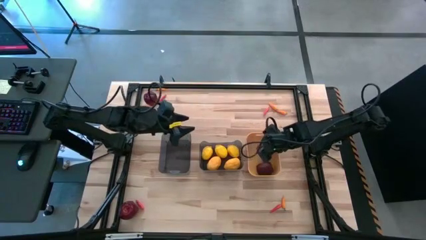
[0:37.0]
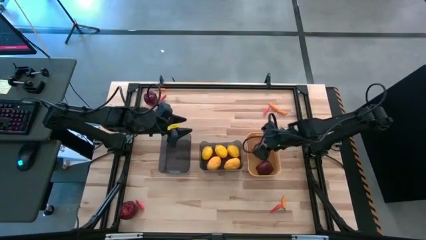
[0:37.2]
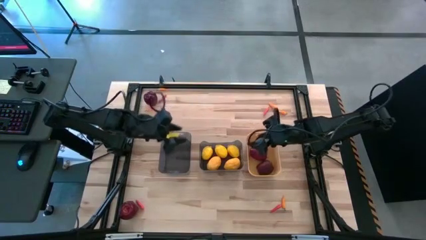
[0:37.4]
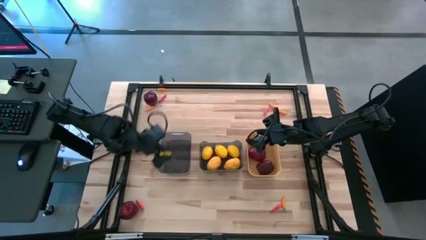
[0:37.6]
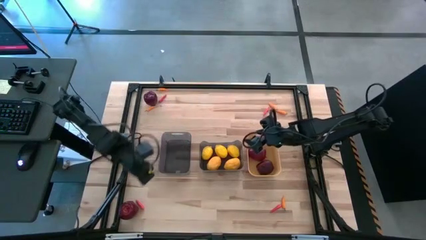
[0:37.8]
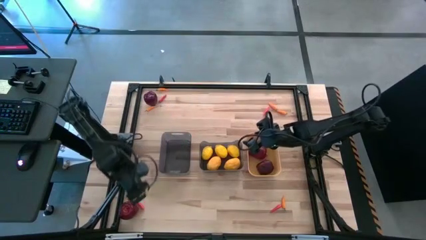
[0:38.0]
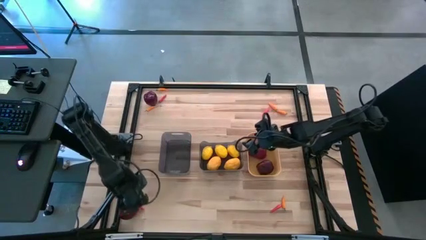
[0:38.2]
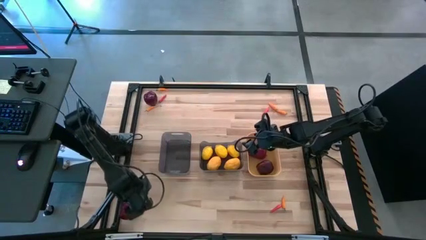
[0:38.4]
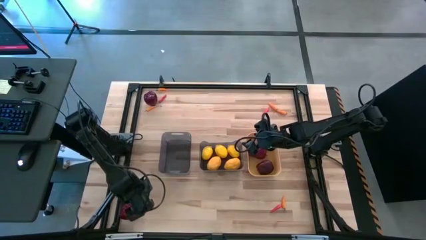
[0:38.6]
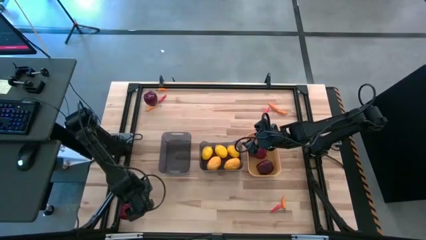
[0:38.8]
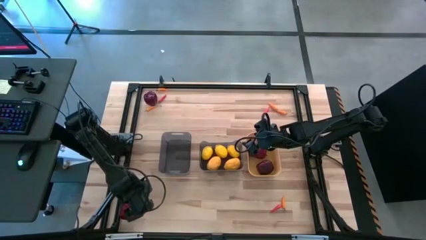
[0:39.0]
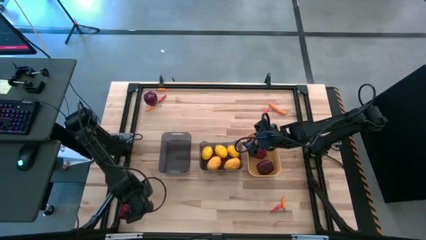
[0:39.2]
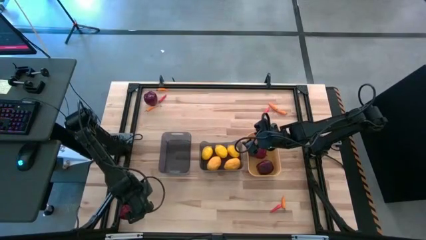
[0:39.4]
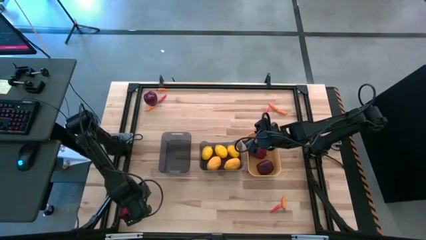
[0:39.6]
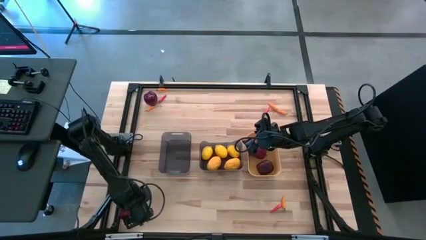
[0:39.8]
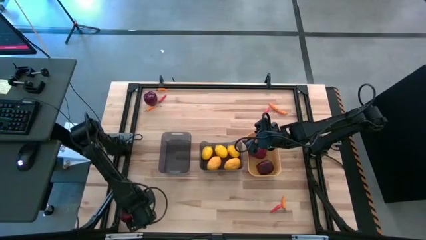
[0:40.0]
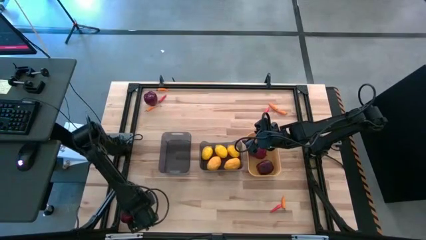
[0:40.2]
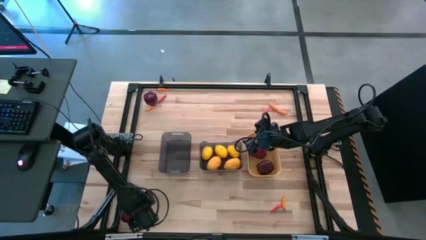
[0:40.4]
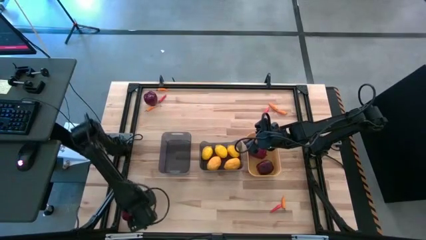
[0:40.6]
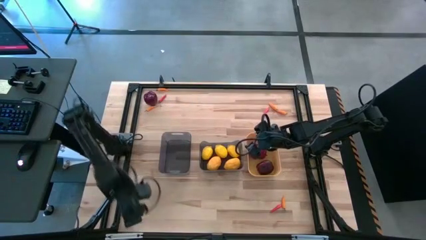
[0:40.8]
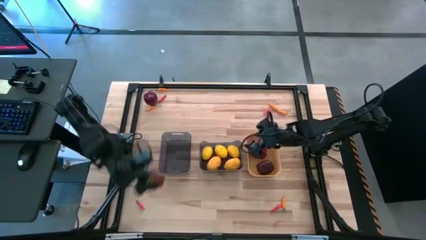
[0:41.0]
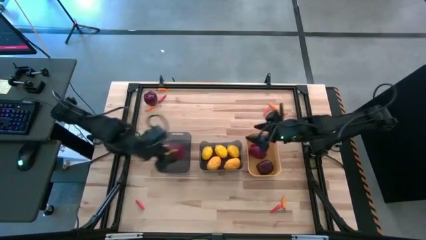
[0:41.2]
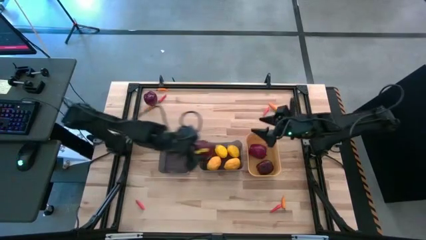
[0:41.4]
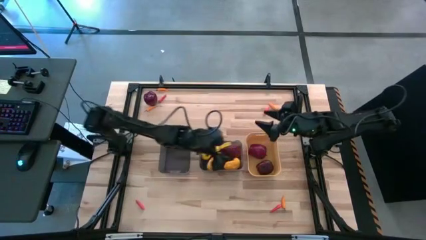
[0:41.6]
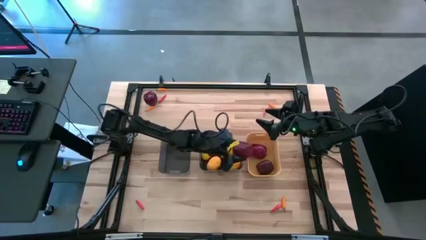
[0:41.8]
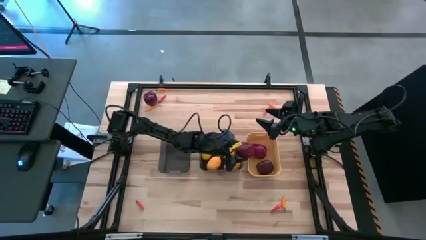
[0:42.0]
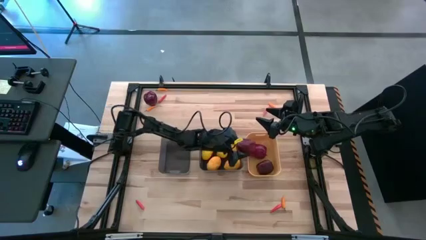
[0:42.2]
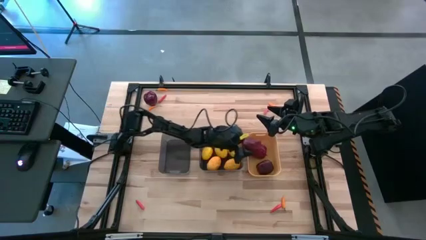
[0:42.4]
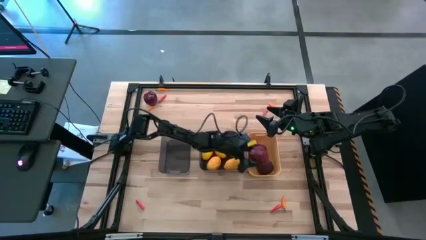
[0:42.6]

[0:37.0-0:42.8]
Task: Sort produce into baskets
Put the apple into the yellow bin

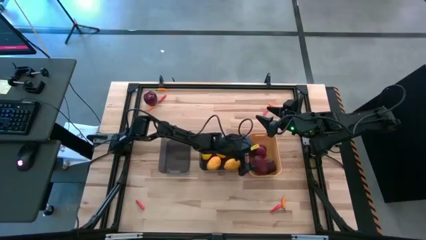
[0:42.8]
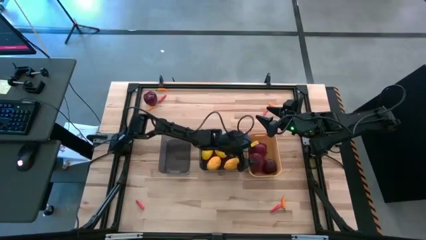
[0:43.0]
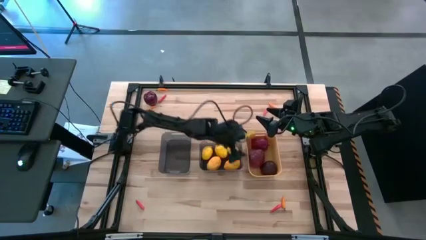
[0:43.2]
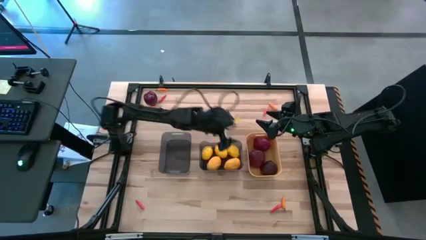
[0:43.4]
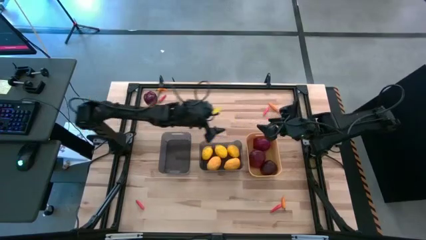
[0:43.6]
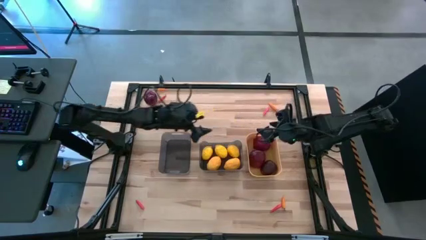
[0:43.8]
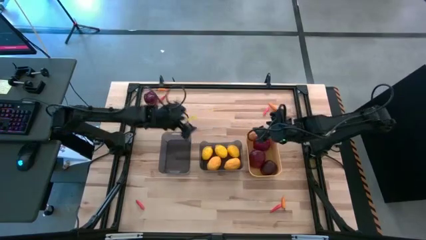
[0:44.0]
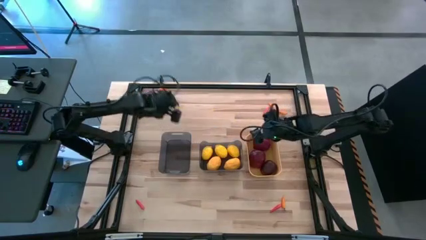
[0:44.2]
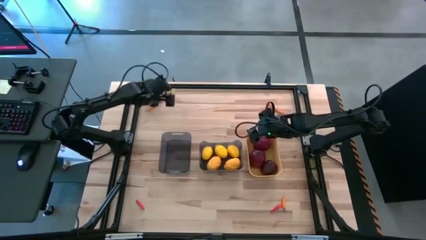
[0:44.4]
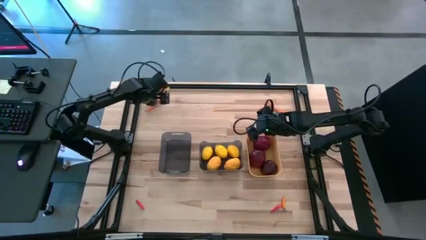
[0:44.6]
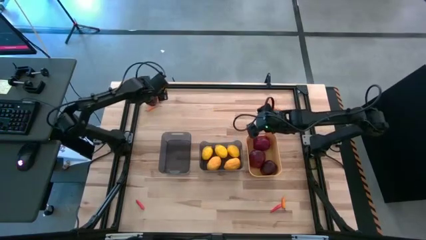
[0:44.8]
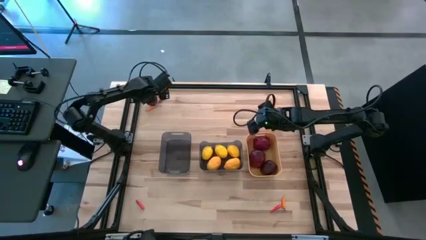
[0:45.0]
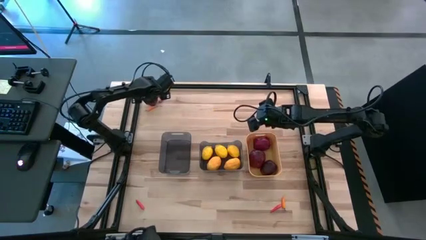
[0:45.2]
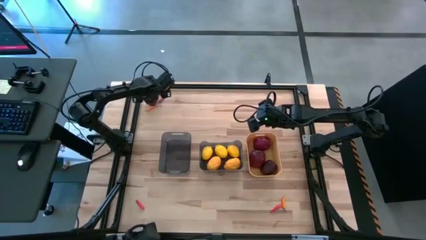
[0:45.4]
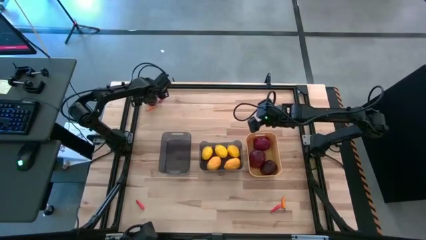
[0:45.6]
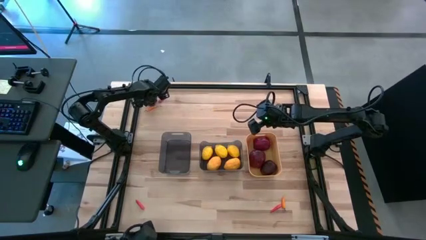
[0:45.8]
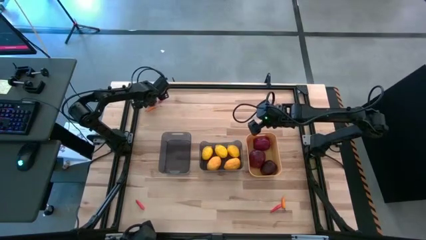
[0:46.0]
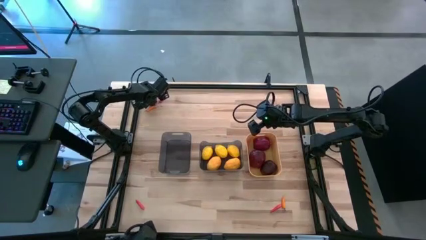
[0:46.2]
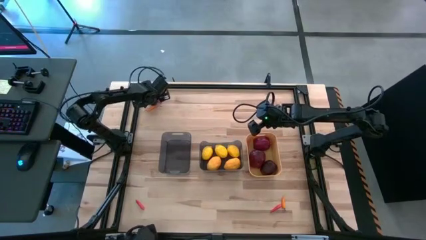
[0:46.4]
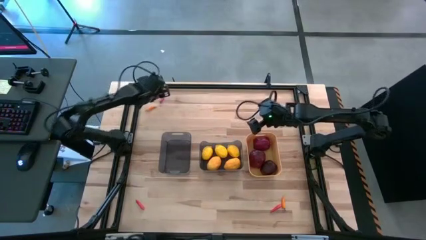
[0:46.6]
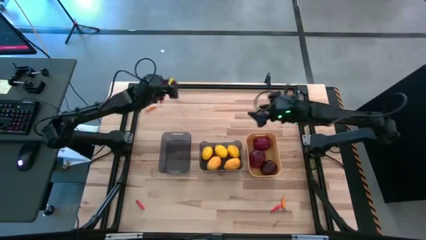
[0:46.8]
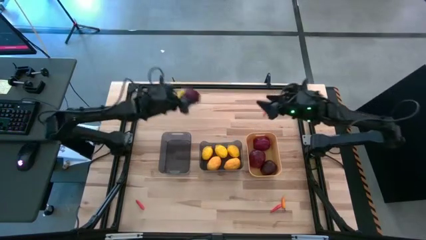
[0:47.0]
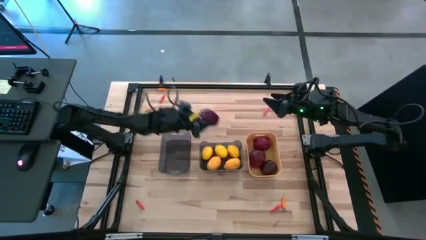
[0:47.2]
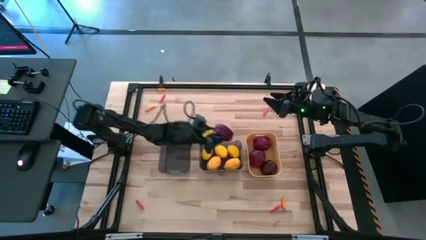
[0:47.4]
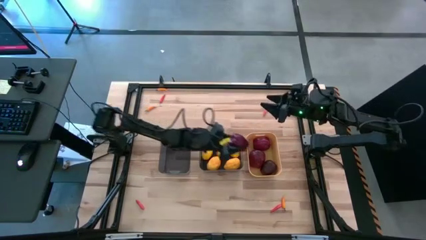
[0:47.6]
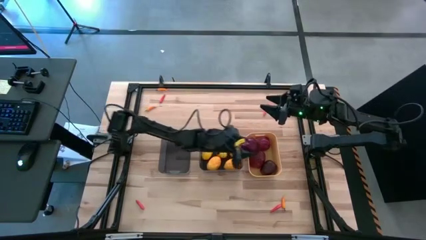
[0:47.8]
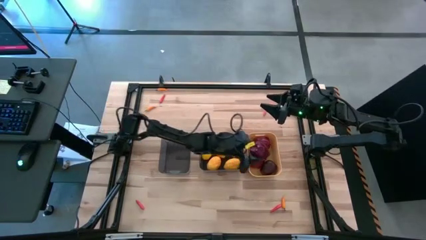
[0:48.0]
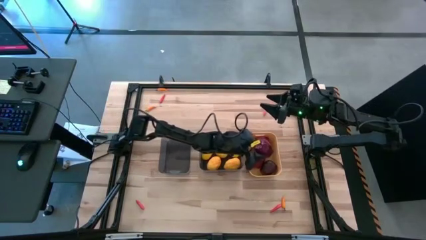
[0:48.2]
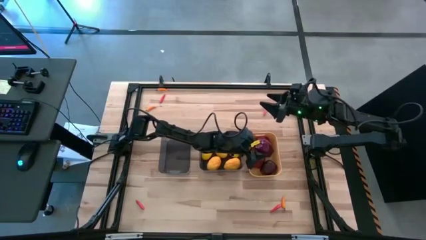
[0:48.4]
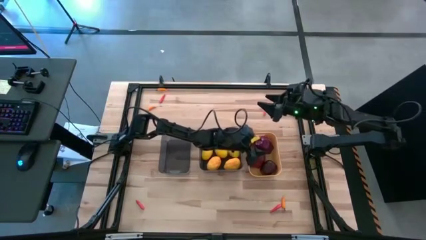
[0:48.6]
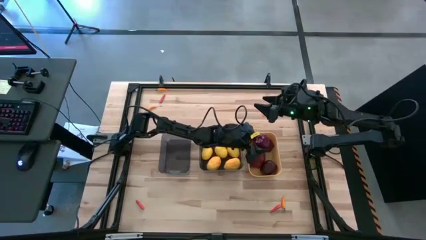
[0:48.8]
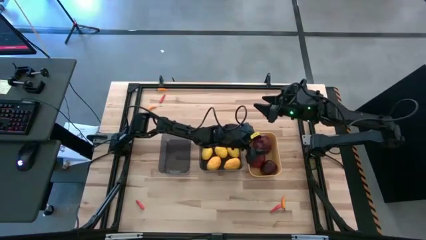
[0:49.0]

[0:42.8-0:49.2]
Put the apple into the yellow bin

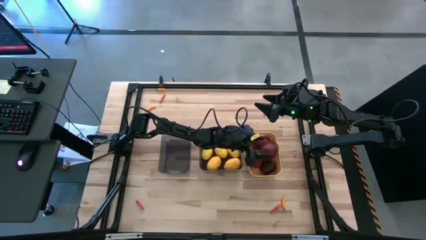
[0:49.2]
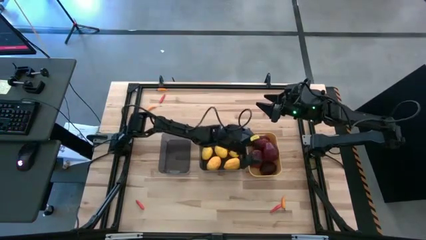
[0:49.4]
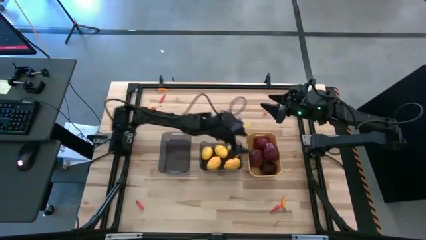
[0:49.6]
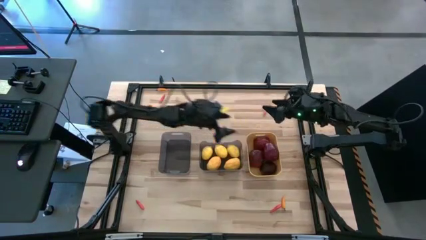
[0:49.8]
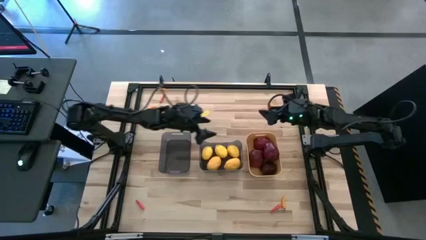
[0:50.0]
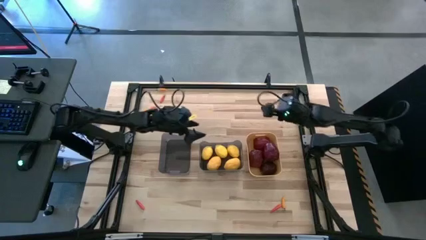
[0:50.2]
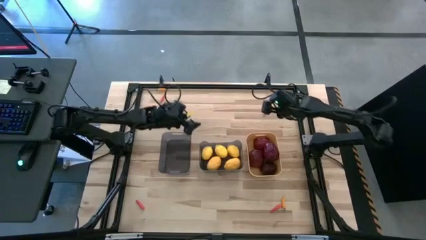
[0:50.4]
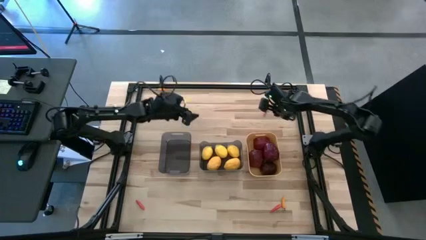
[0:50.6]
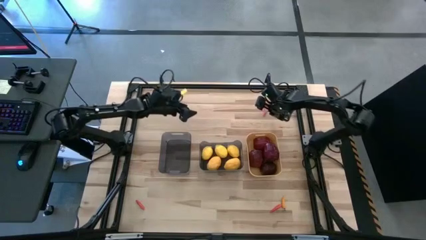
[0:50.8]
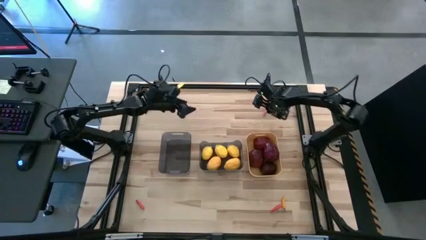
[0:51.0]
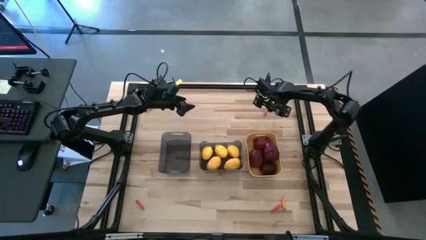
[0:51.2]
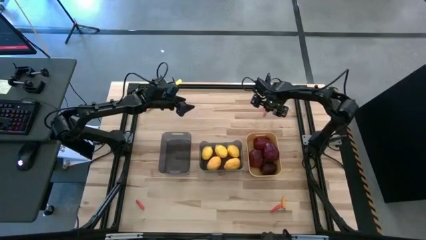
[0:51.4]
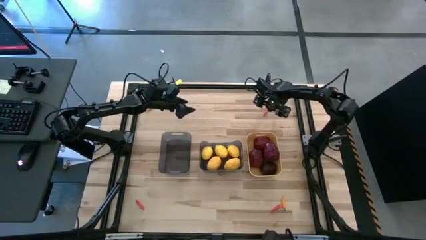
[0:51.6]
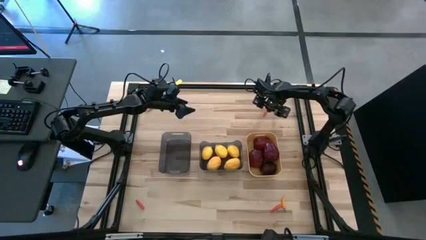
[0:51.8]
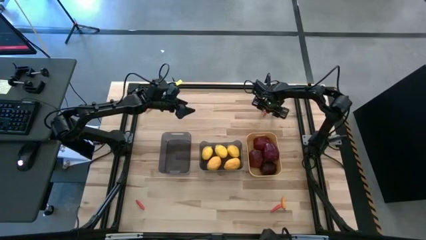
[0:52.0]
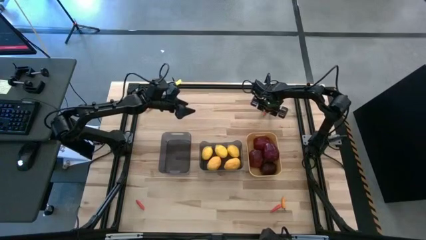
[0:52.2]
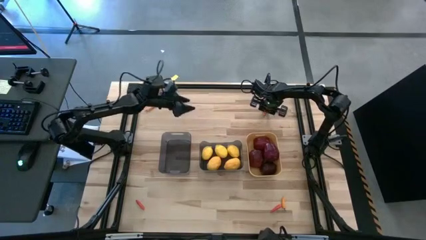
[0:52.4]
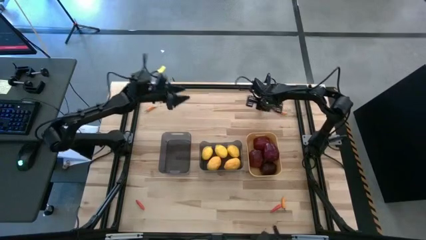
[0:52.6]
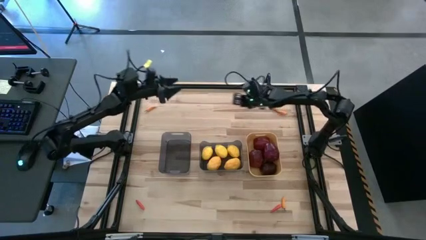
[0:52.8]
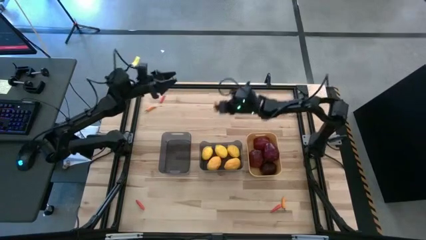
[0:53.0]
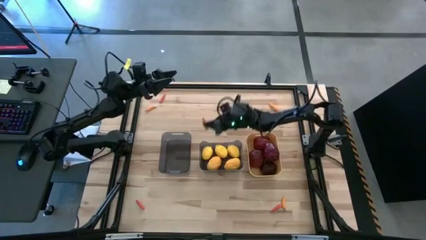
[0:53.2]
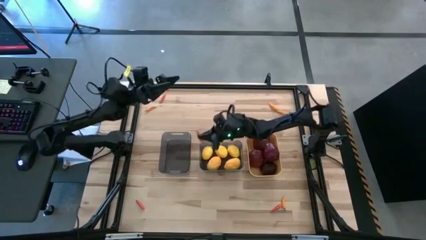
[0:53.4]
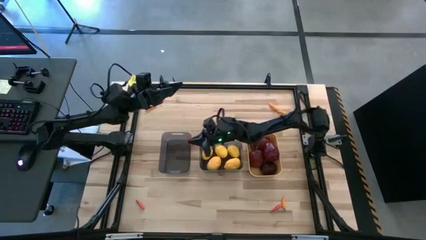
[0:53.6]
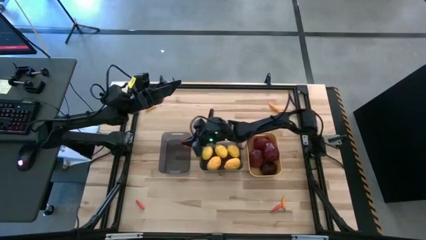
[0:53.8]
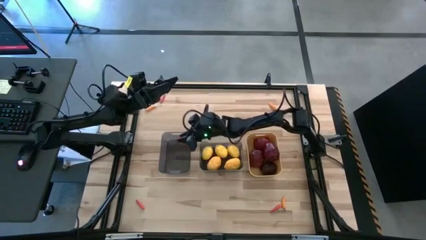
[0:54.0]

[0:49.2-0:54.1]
Put the orange chili pepper into the left black bin

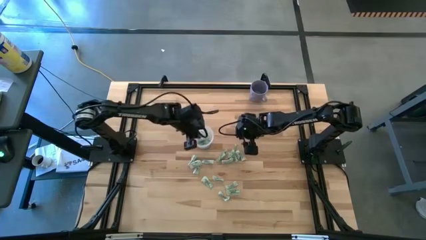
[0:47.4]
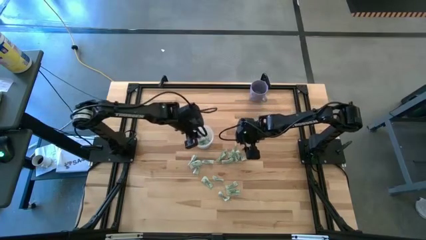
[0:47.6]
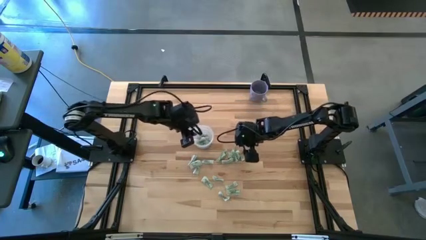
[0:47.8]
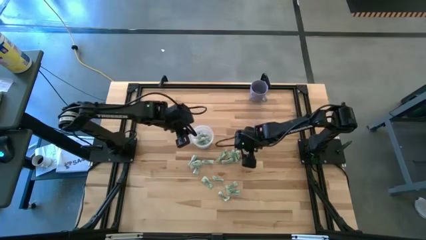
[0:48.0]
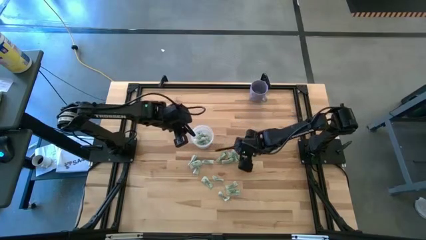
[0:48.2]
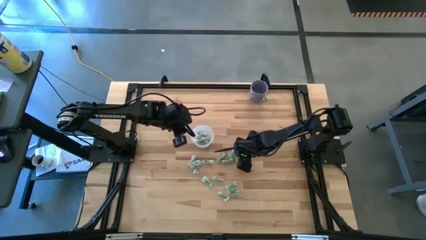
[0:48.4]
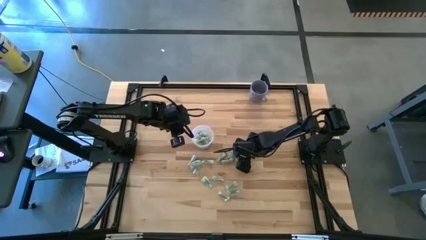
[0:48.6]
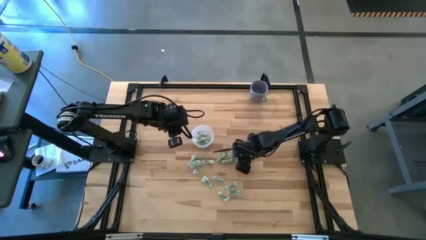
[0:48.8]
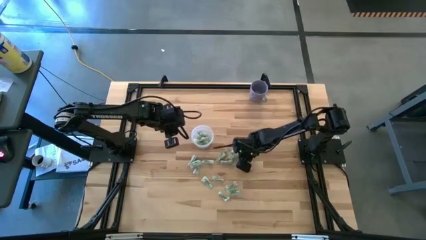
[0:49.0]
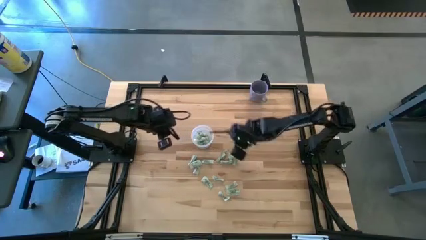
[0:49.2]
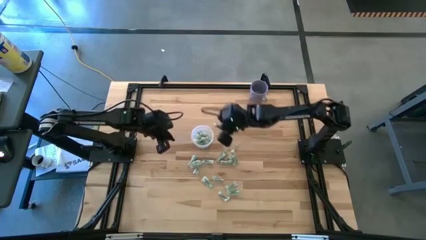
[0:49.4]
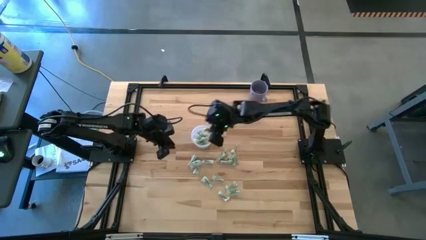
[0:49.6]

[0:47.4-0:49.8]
Task: Pick and place Stevia / Truvia into bins
Put the white stevia packet into the transparent container
